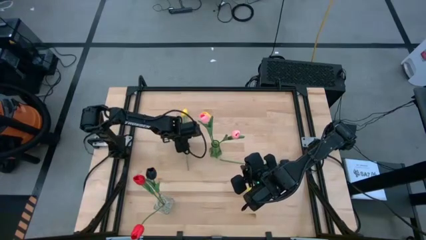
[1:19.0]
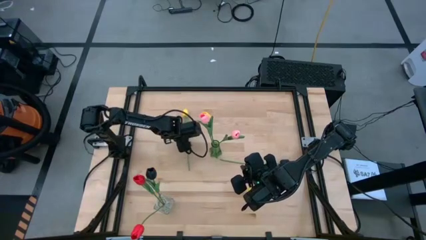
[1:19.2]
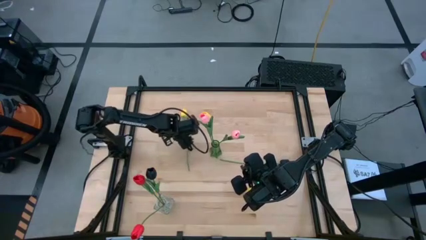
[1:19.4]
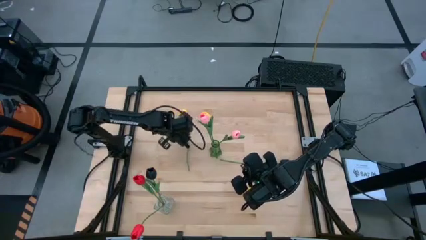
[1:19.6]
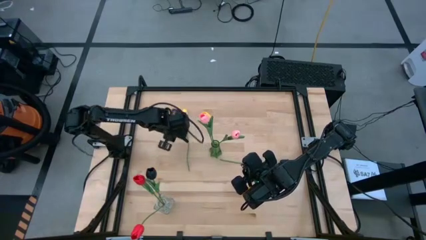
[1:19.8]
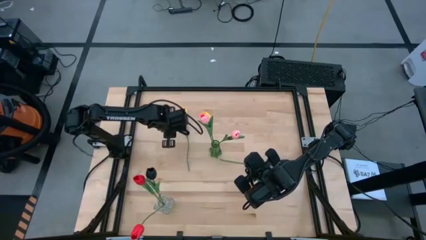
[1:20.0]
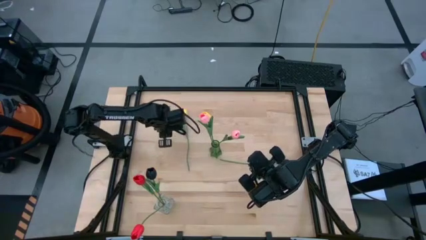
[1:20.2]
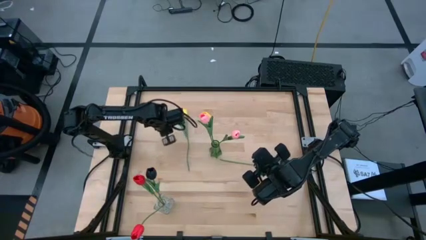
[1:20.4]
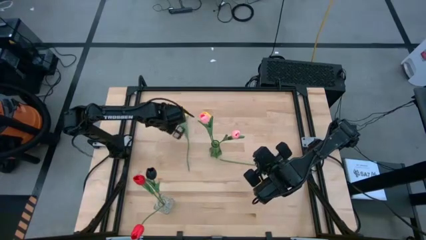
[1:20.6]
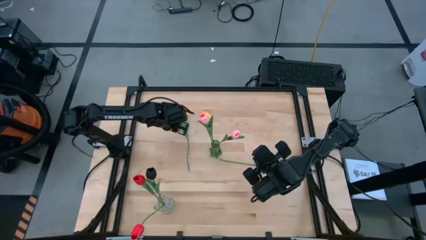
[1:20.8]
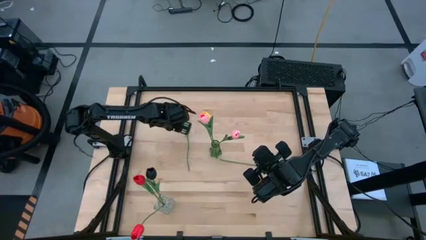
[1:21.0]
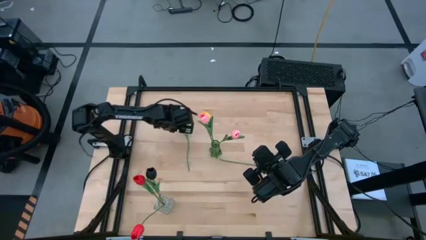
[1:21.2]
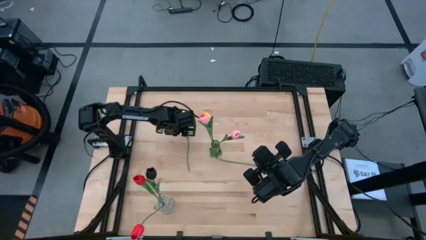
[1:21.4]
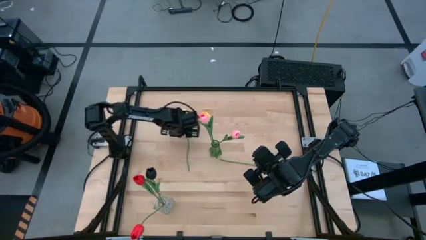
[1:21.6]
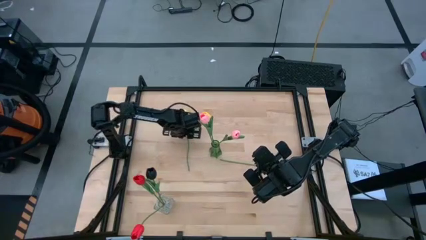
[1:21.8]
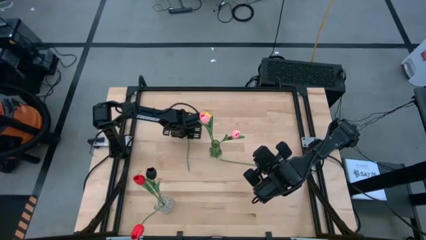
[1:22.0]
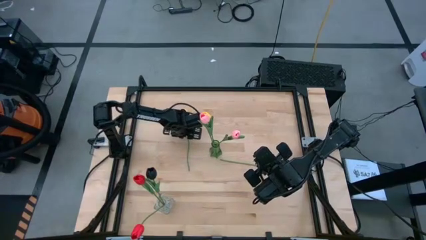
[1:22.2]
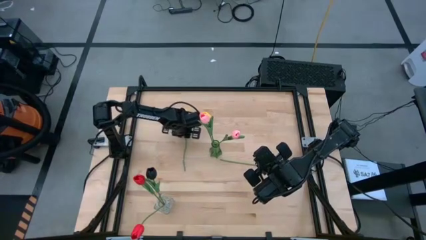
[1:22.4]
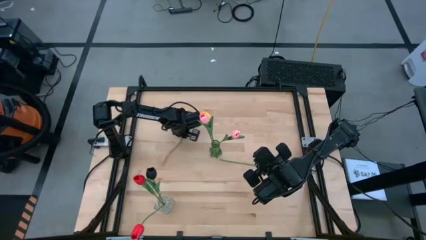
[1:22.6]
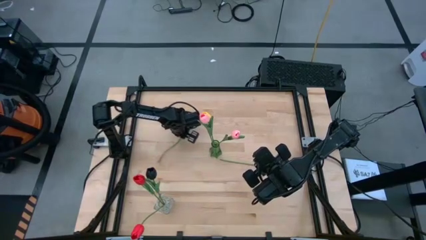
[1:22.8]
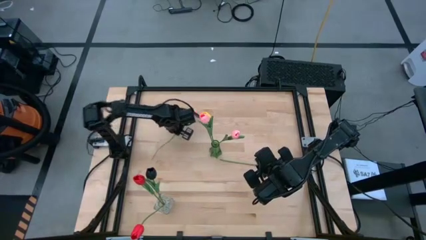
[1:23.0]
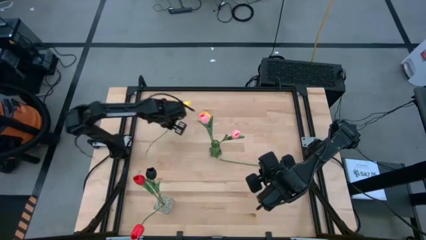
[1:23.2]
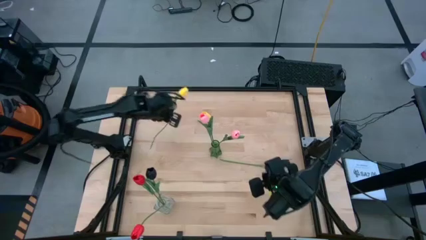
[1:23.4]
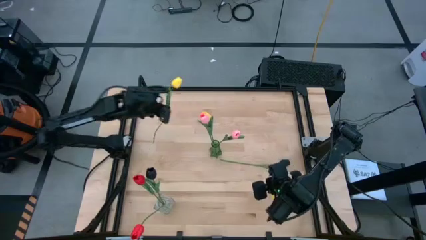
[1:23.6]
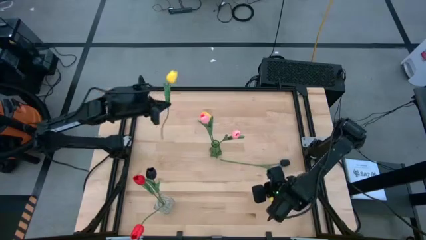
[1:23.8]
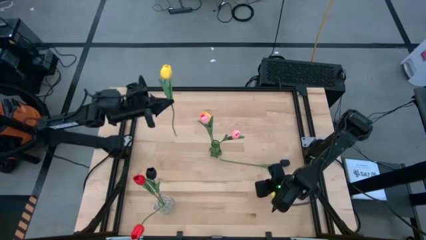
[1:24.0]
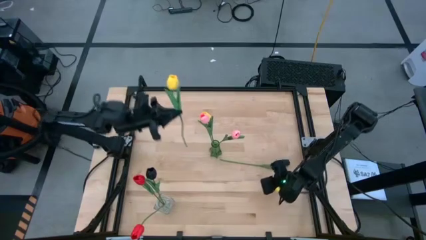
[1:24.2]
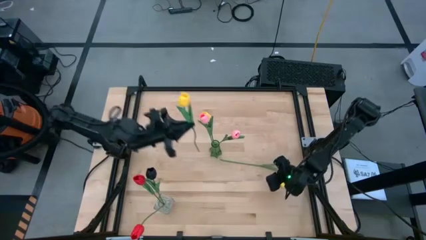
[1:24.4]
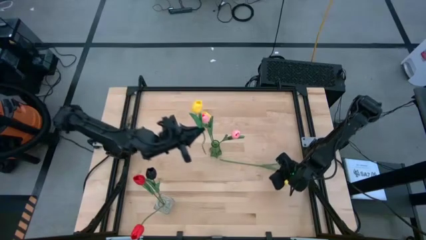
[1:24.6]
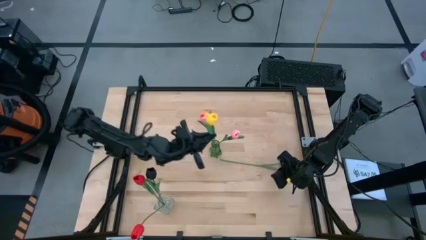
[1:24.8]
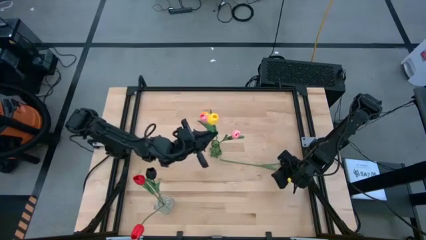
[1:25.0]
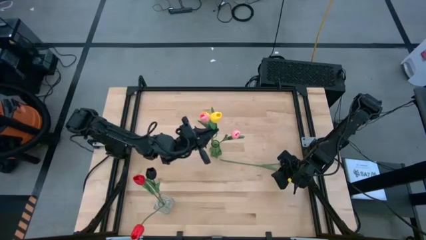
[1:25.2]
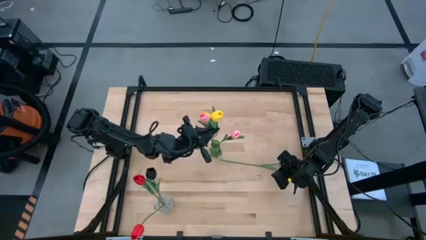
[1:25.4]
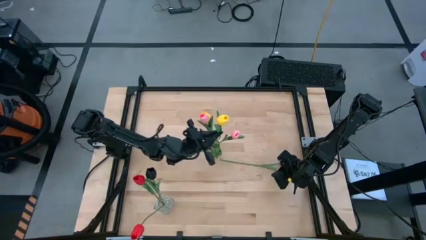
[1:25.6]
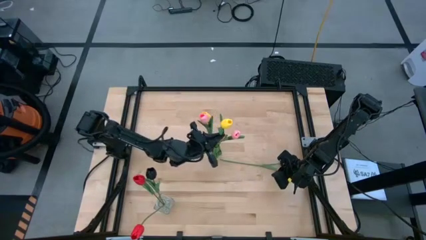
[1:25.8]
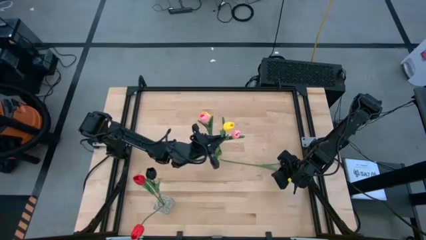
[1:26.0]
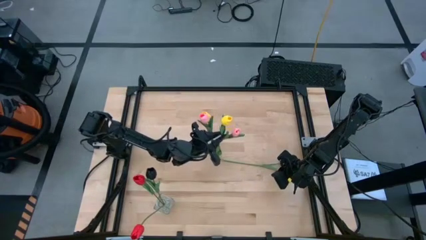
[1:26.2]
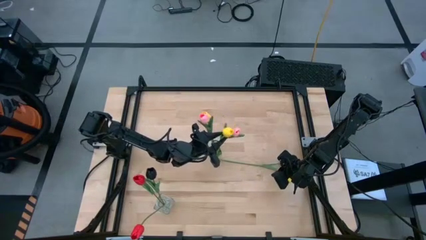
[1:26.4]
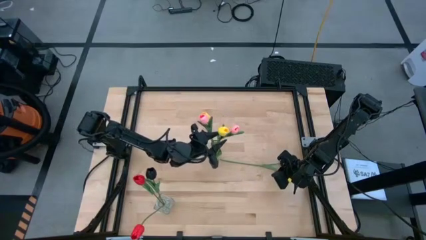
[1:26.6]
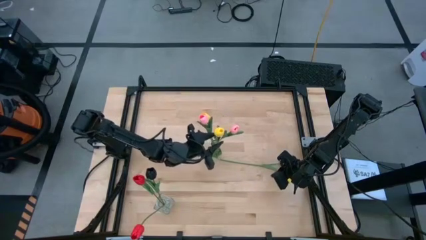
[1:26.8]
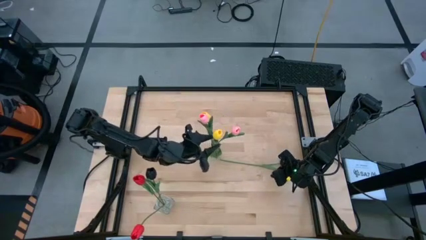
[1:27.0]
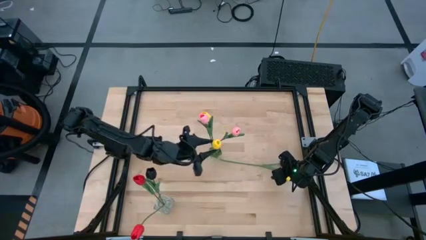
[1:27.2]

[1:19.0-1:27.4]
Task: Sort flowers into vase by color
Put the yellow tulip into the green vase

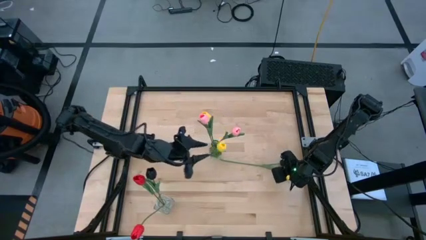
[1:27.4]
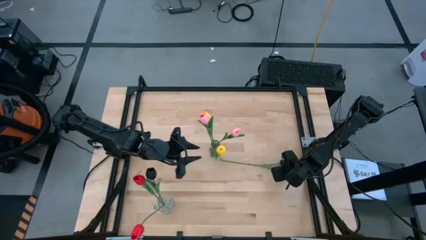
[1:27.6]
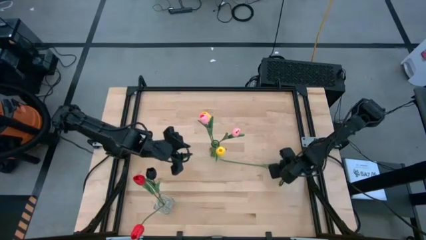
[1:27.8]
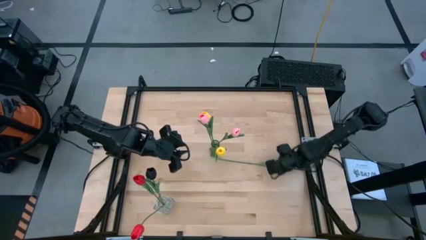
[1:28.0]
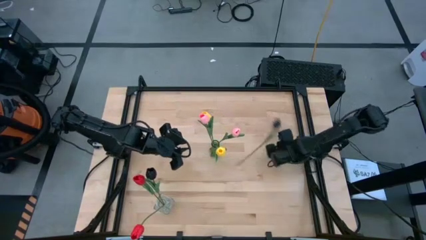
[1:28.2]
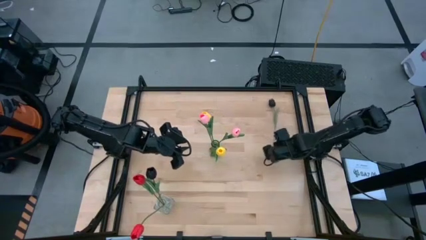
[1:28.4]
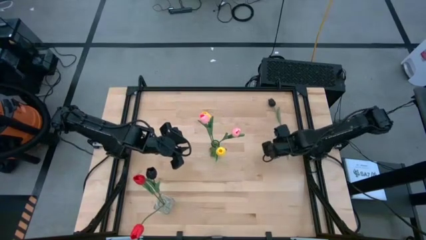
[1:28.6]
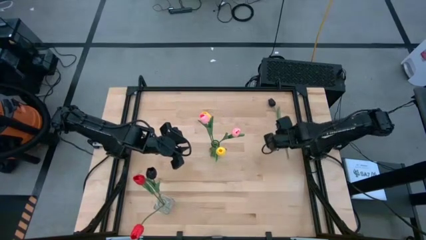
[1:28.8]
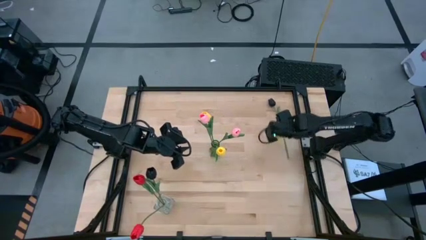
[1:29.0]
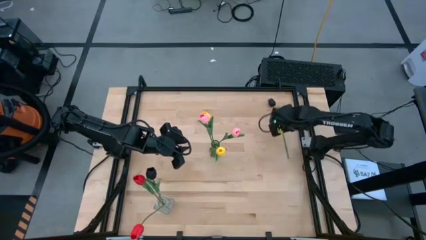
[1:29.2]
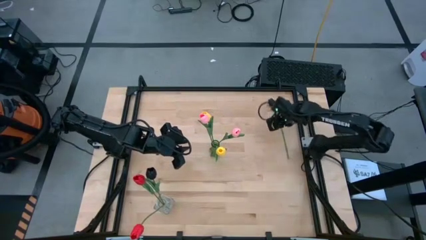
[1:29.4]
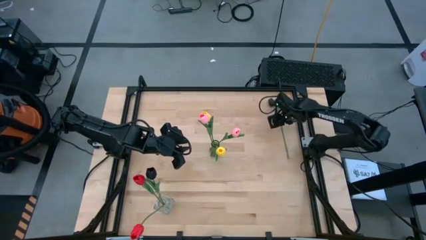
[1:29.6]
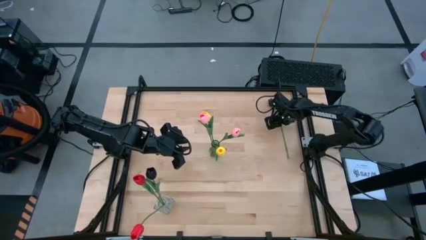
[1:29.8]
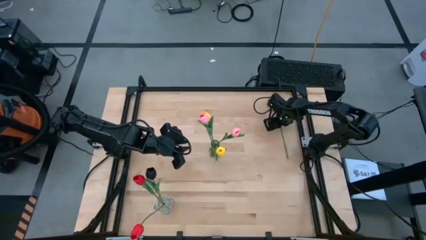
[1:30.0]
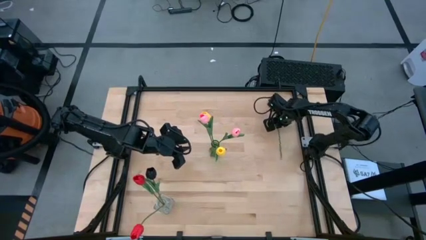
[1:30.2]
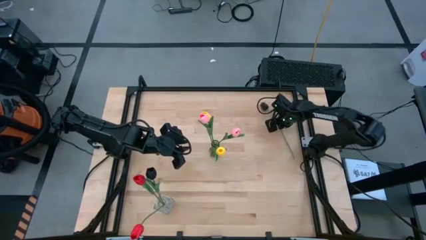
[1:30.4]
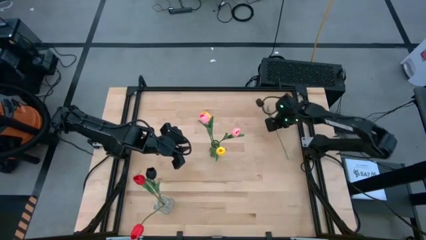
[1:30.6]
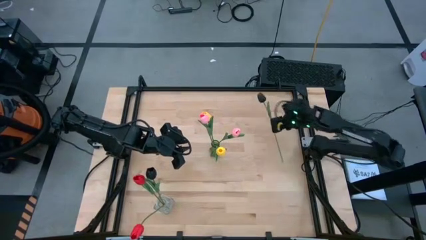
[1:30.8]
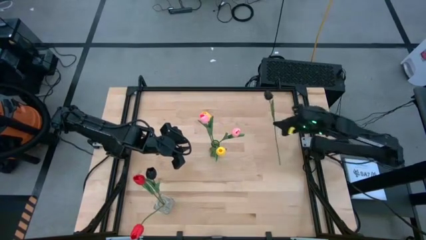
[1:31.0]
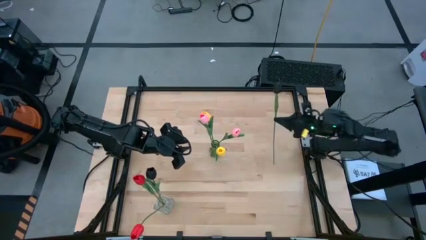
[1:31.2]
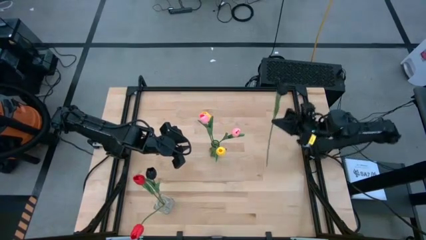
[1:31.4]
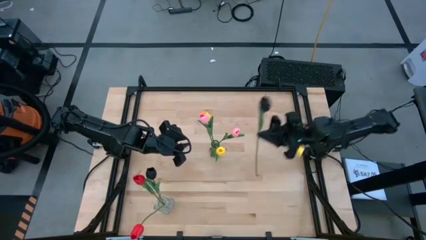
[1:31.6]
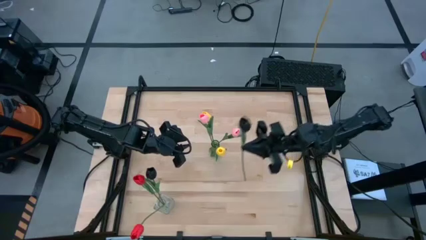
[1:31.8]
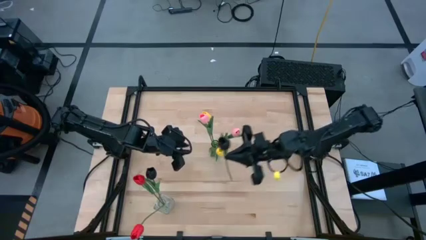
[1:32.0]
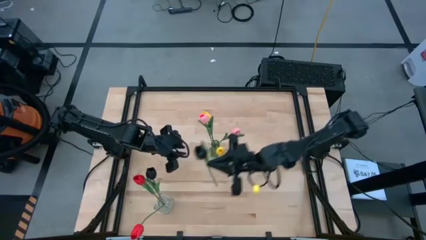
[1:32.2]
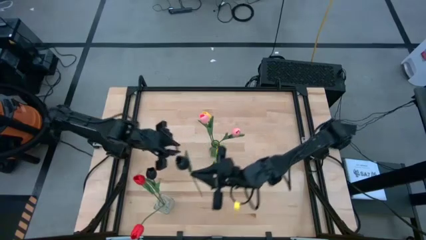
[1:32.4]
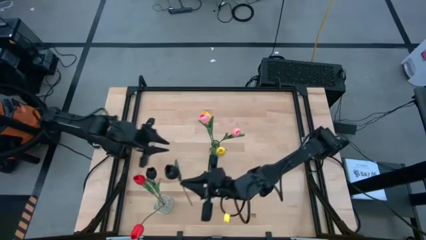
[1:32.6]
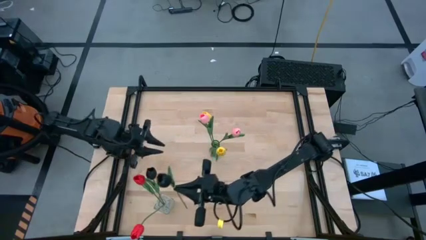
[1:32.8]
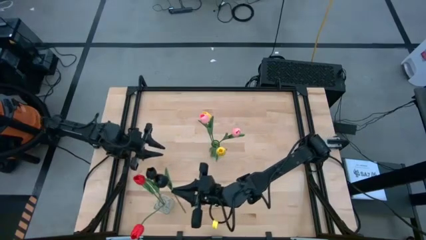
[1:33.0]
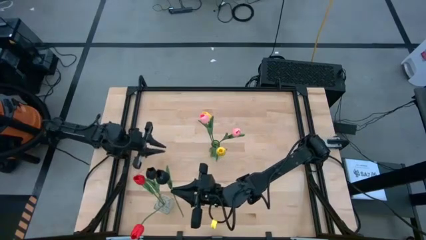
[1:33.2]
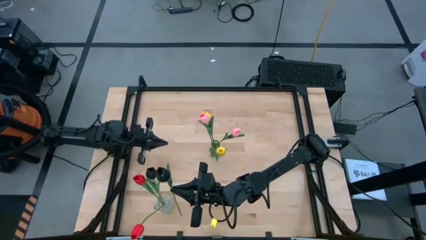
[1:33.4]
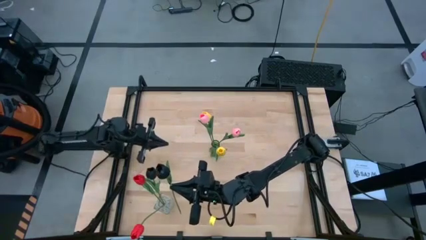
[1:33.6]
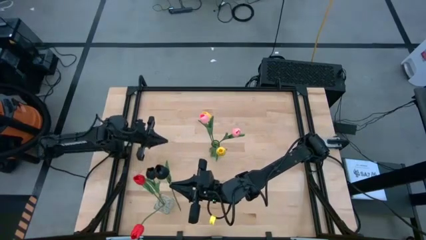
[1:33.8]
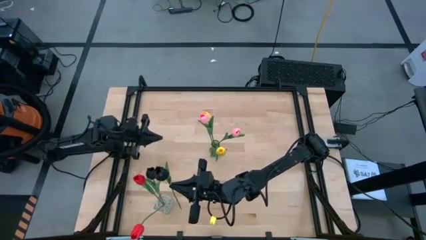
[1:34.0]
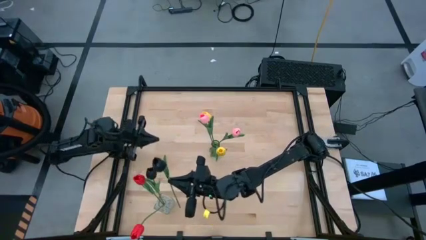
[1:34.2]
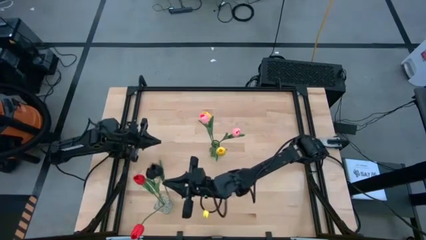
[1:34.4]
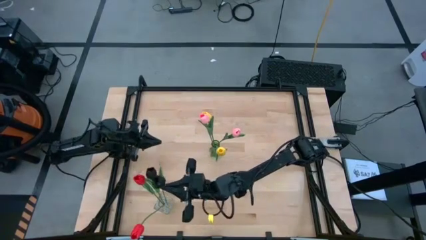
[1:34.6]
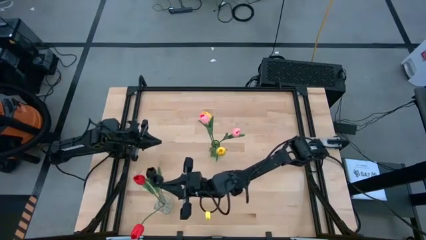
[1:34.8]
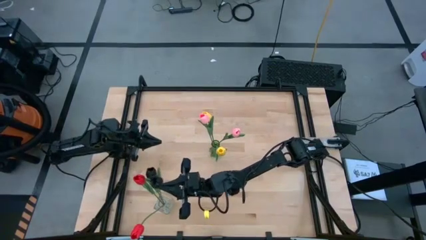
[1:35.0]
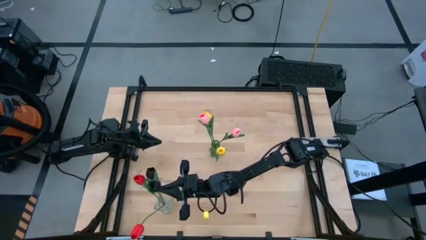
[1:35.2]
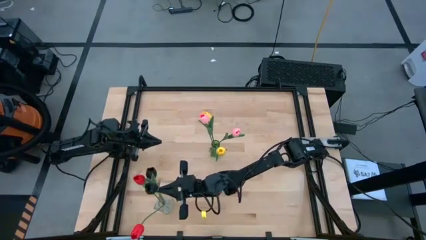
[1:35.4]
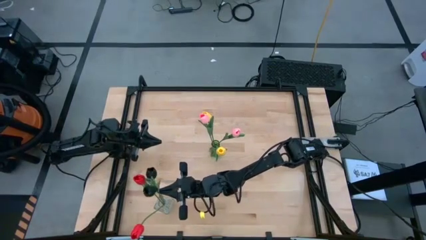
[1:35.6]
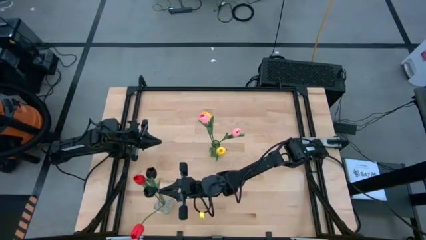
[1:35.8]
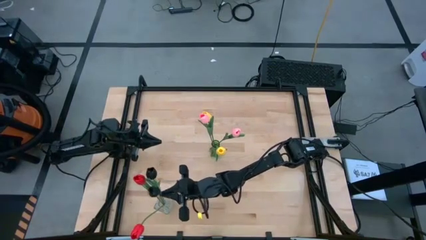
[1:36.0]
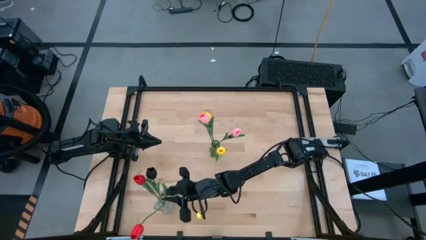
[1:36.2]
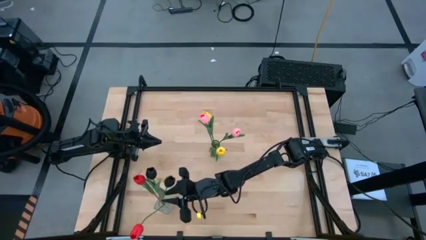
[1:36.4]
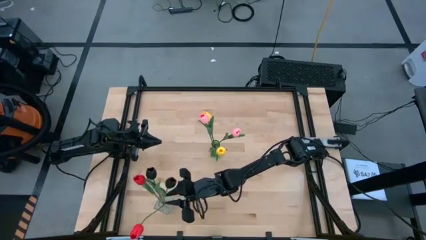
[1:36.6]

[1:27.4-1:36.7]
Put the black tulip into the transparent vase
